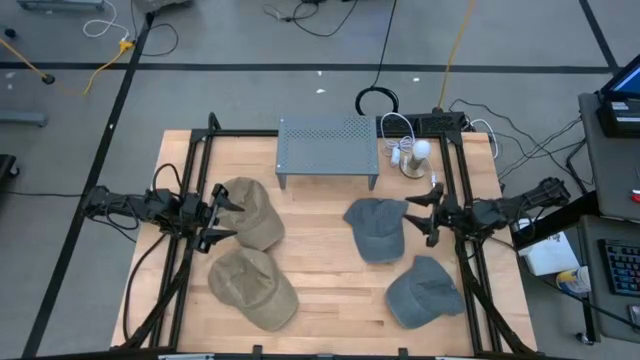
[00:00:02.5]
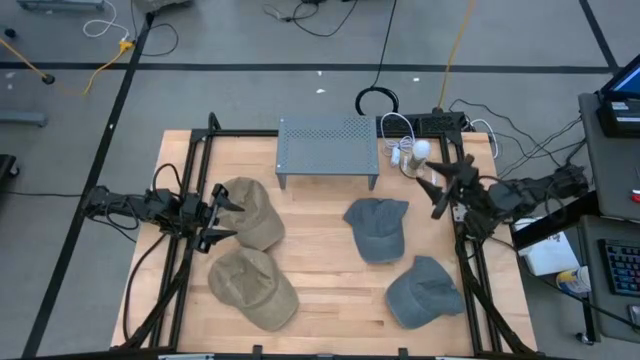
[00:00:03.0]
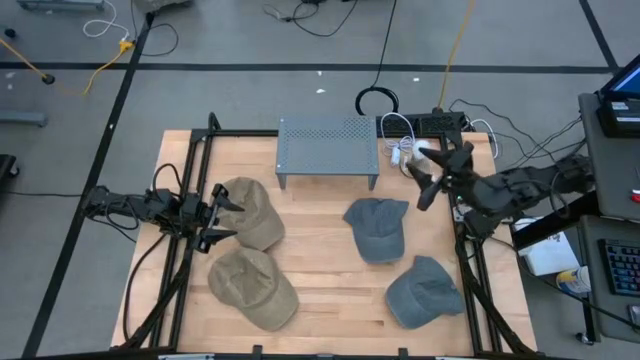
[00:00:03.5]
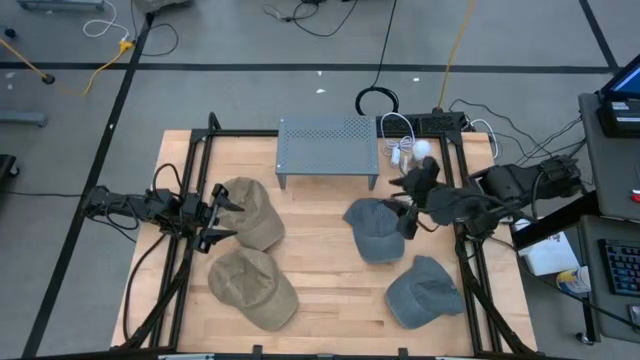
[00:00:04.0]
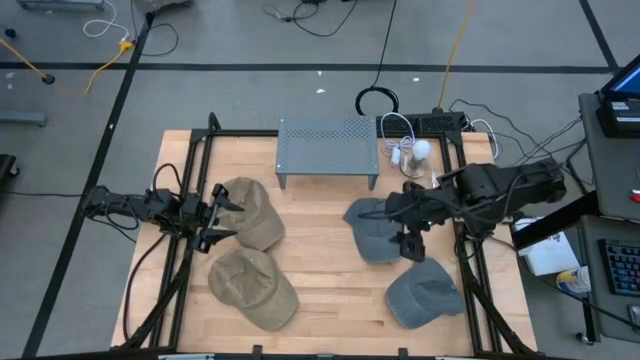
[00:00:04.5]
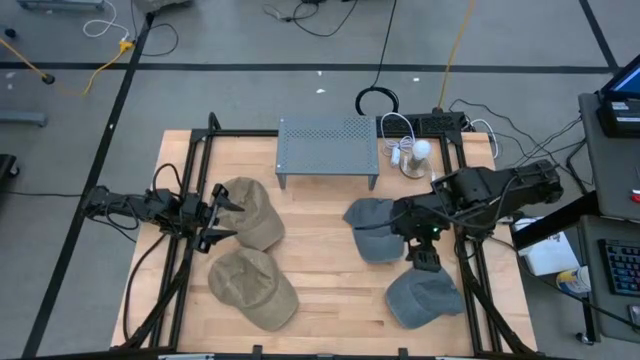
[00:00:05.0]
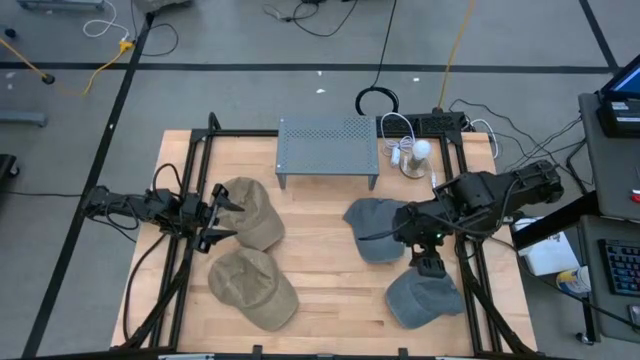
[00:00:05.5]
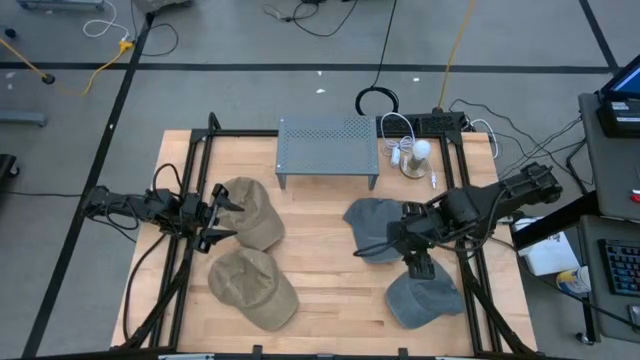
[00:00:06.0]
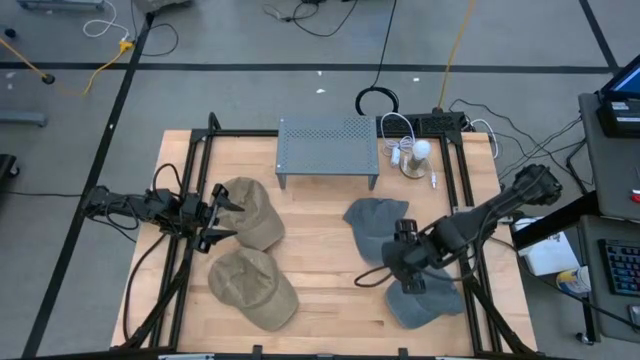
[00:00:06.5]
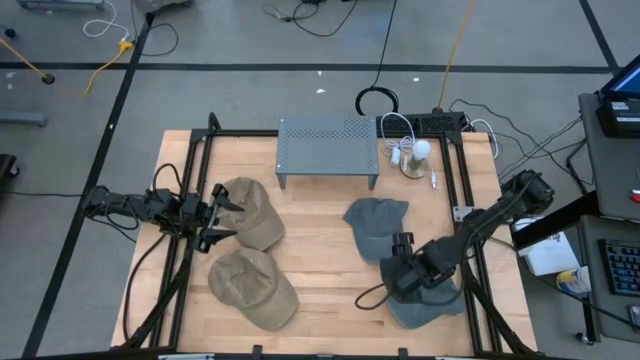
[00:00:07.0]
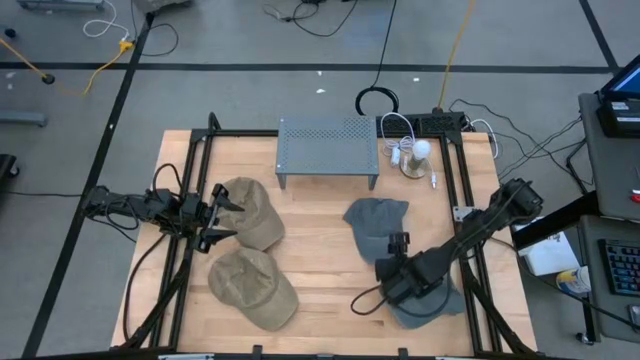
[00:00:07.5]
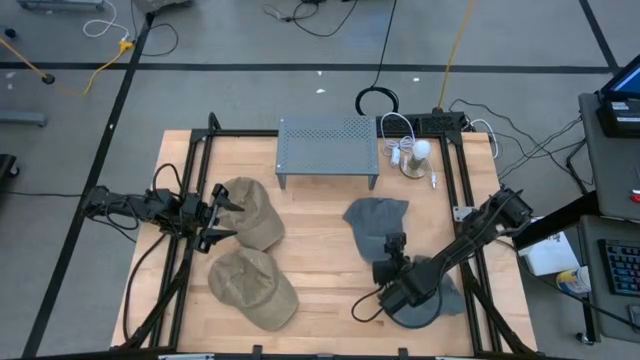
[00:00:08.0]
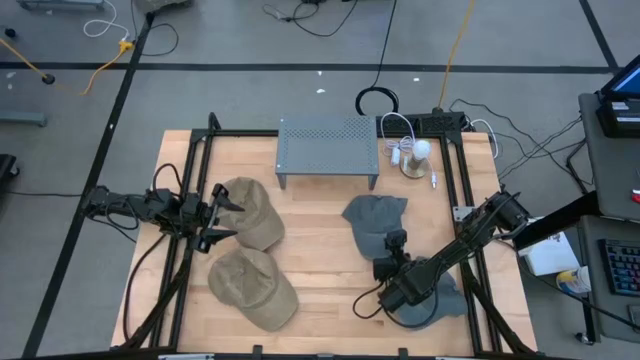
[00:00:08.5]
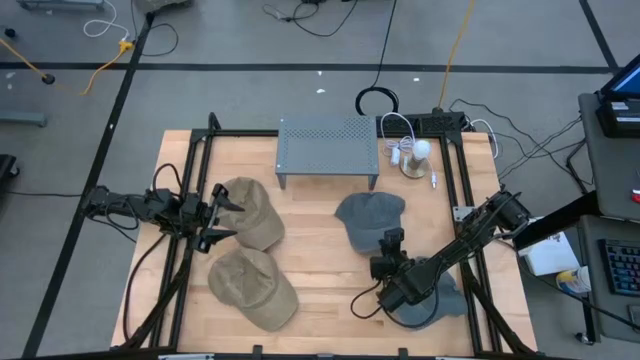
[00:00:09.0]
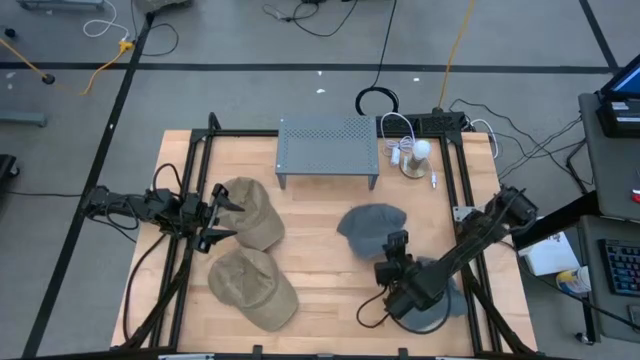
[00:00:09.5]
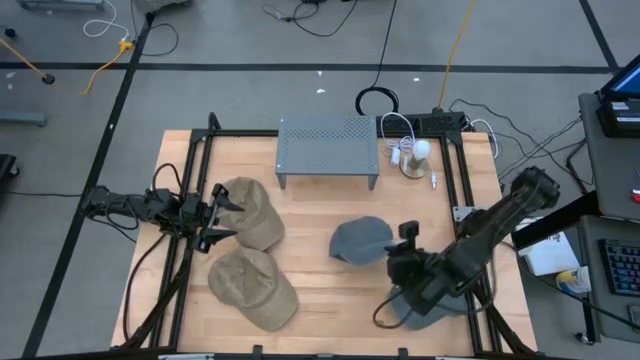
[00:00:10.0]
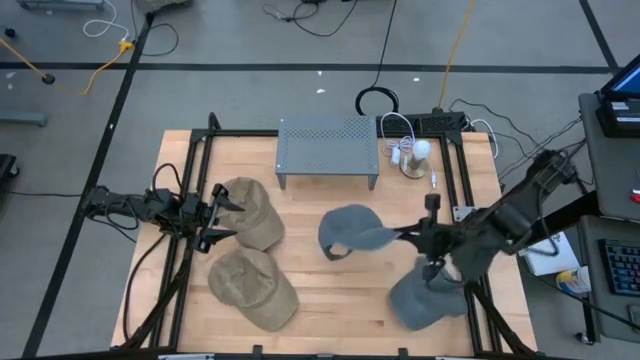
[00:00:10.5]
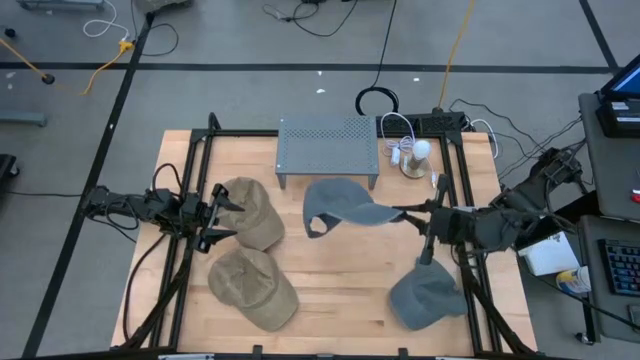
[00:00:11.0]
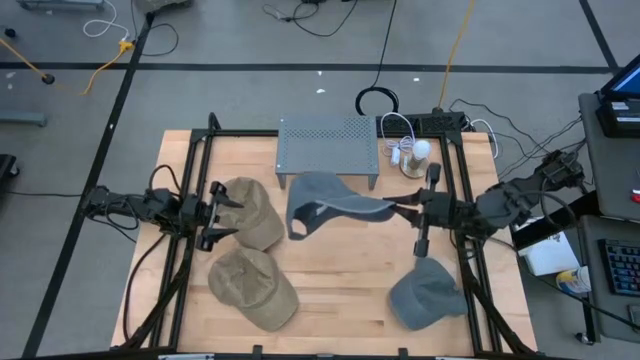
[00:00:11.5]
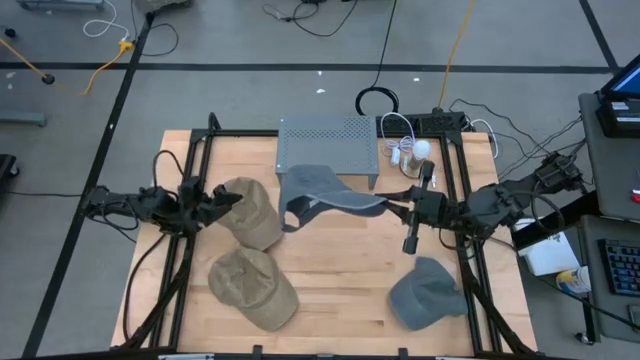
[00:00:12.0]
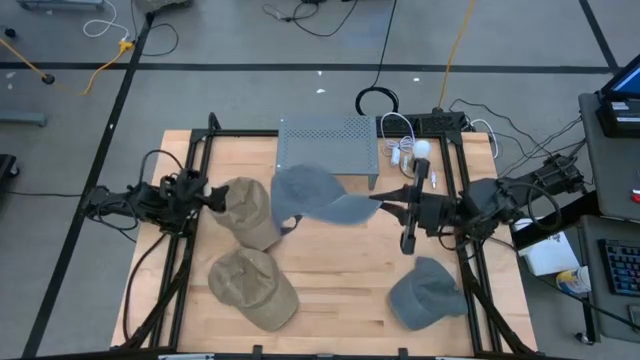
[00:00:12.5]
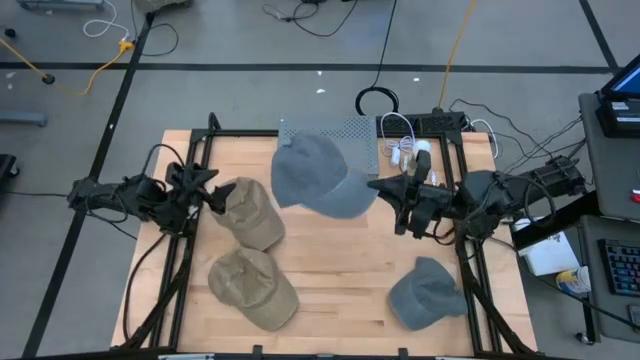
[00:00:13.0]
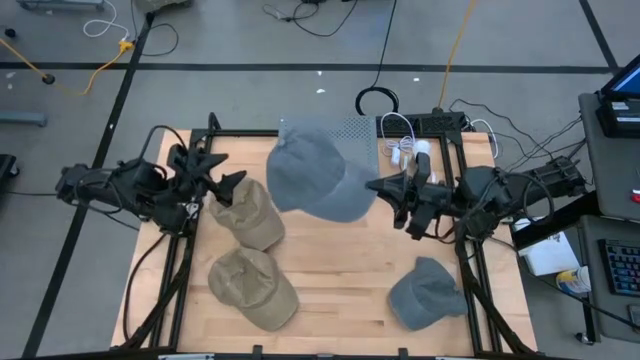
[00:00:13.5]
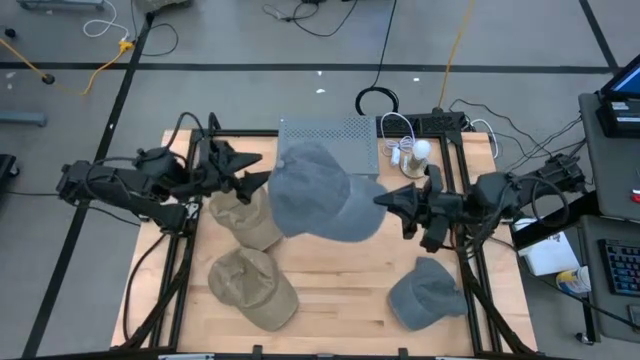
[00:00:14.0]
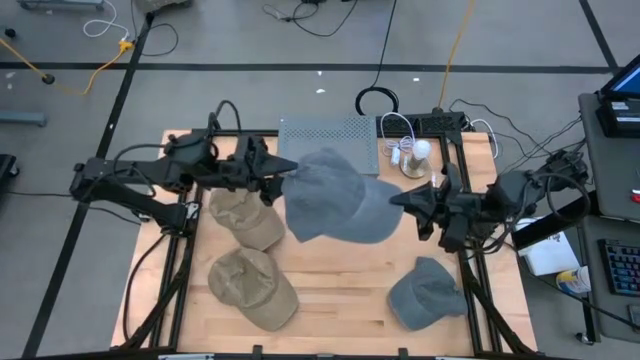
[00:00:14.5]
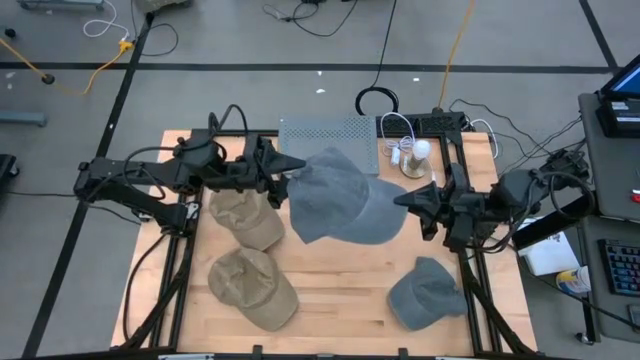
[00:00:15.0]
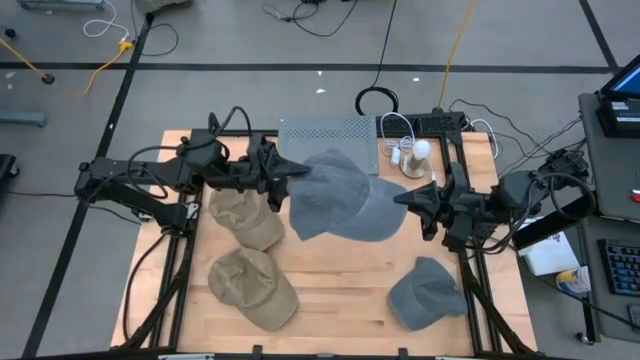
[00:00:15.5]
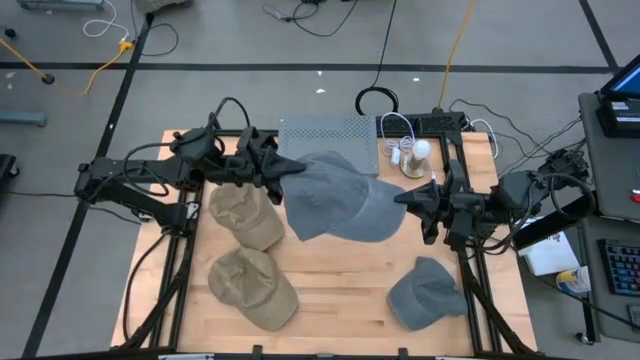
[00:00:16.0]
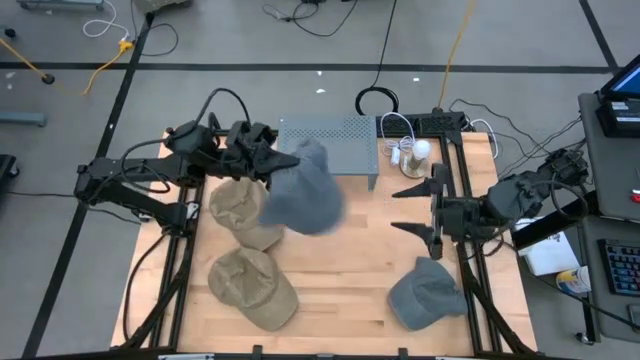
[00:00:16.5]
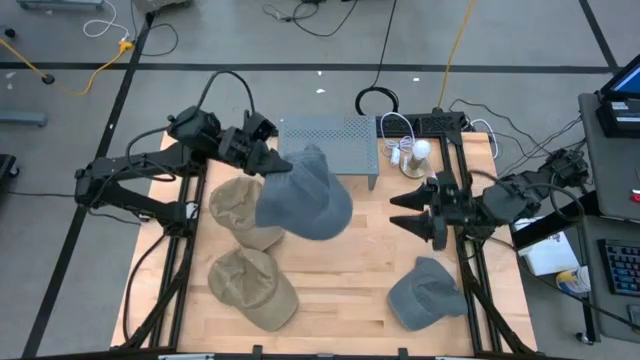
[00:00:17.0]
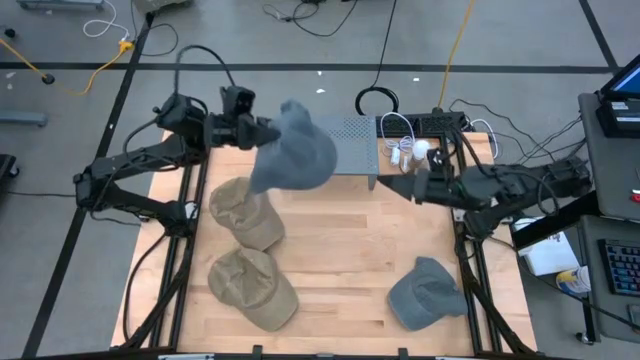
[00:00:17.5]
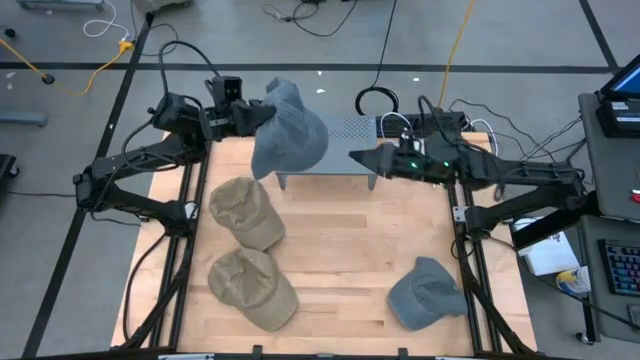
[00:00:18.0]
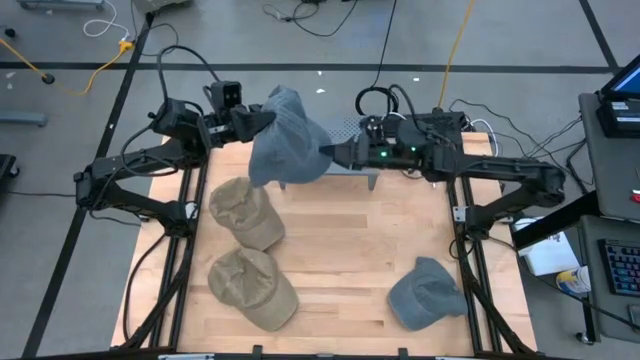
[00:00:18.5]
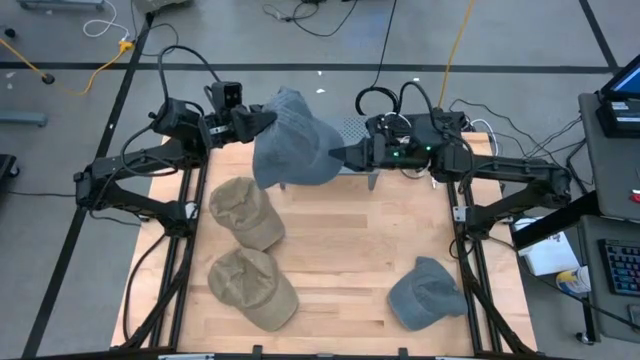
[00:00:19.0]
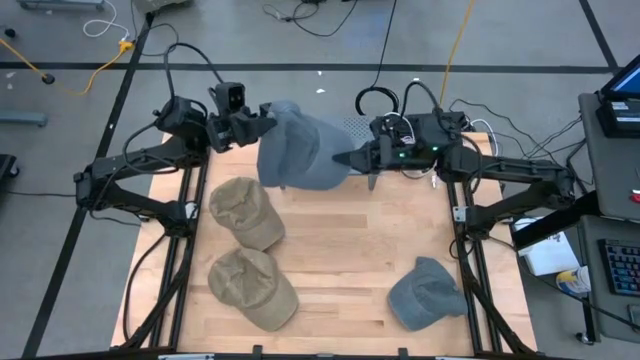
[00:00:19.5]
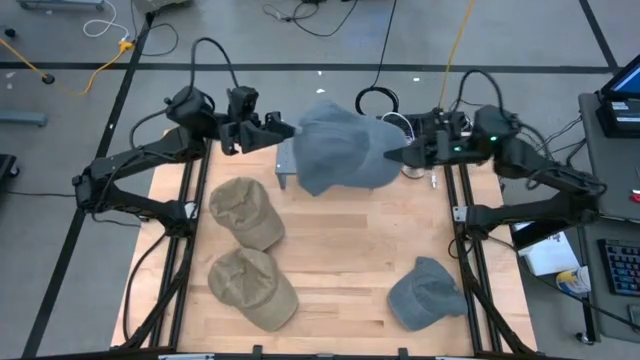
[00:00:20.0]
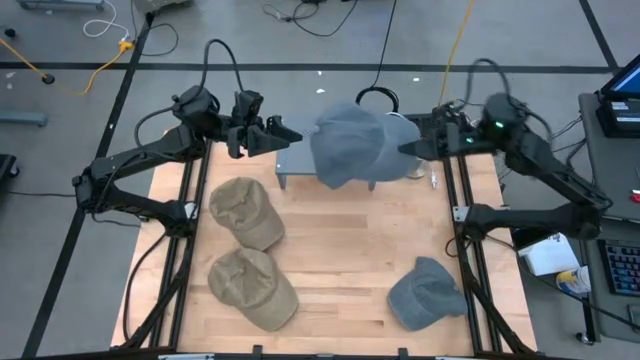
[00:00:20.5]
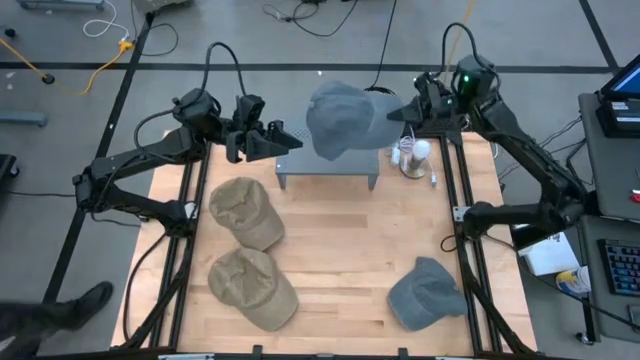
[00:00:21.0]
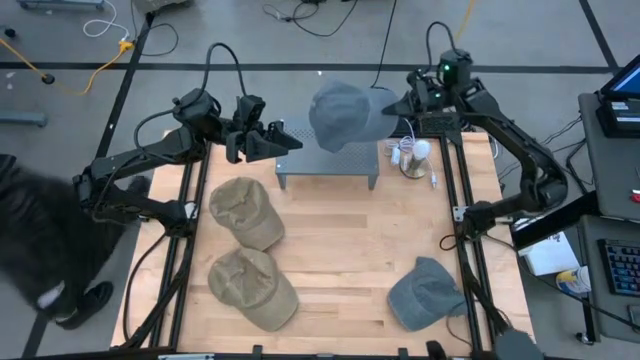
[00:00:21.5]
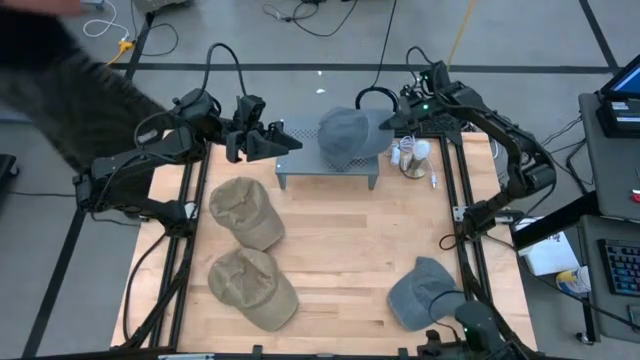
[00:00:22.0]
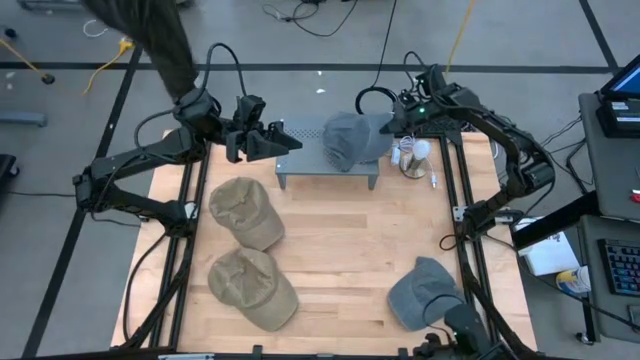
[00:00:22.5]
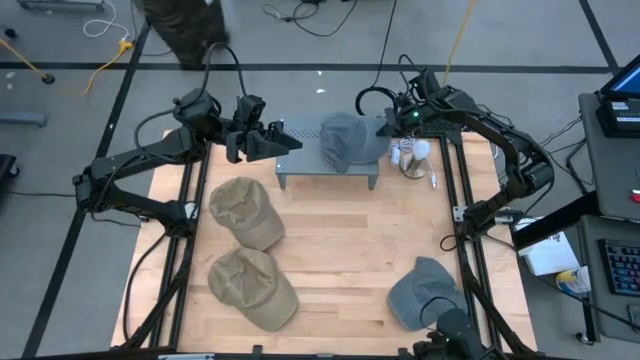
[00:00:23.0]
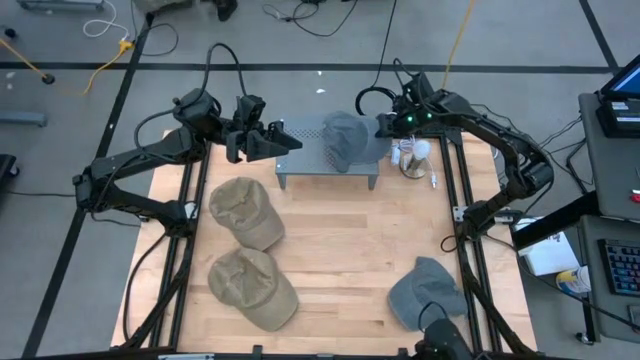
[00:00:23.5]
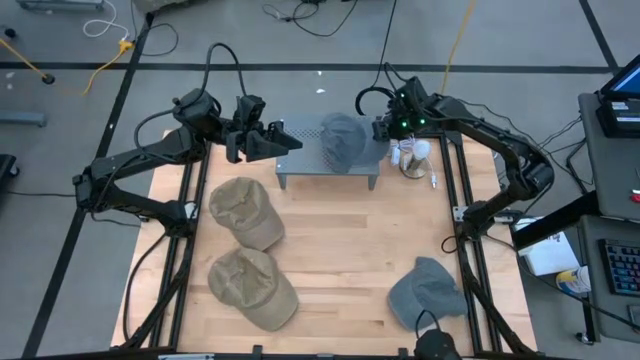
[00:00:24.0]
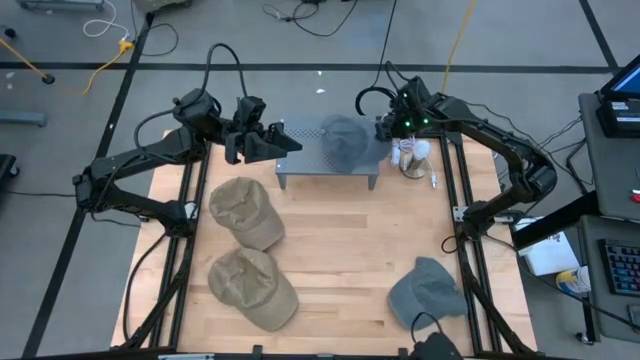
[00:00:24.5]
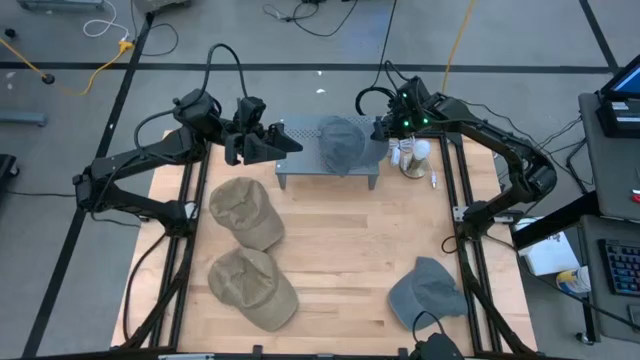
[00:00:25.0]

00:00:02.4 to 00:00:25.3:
Task: Pick & Place hat
Put the top black cap on the shelf
